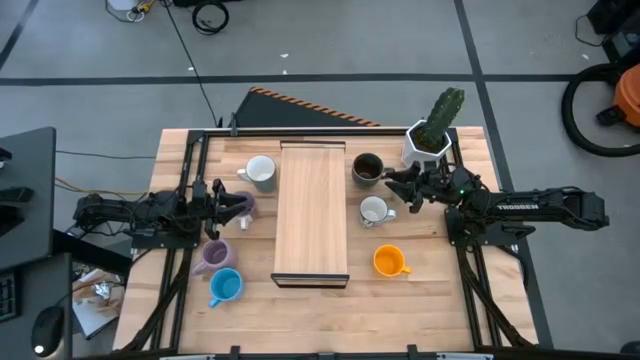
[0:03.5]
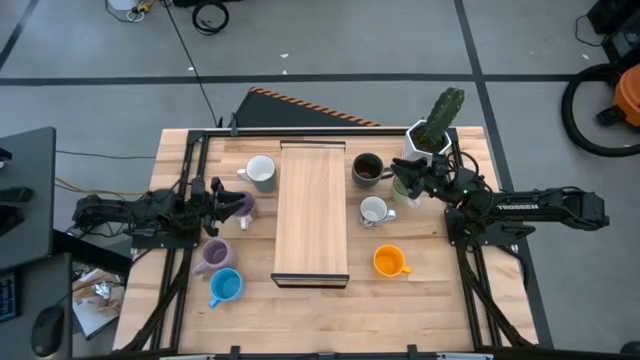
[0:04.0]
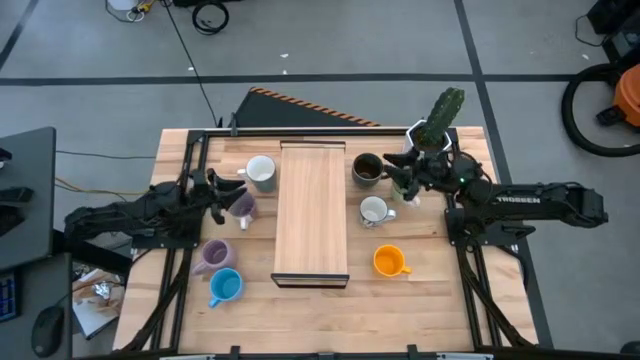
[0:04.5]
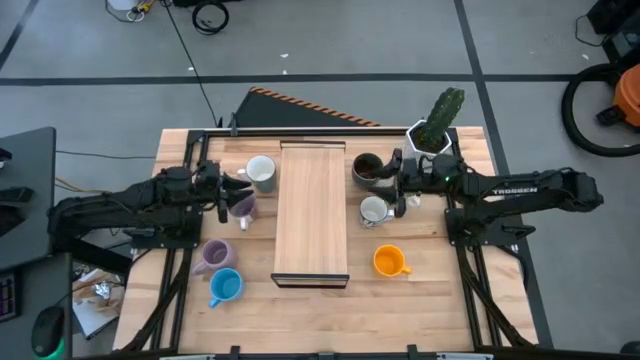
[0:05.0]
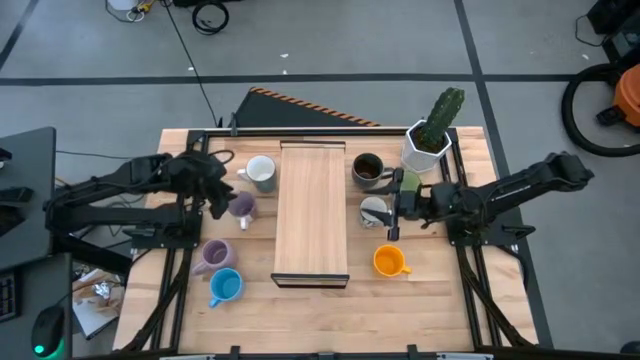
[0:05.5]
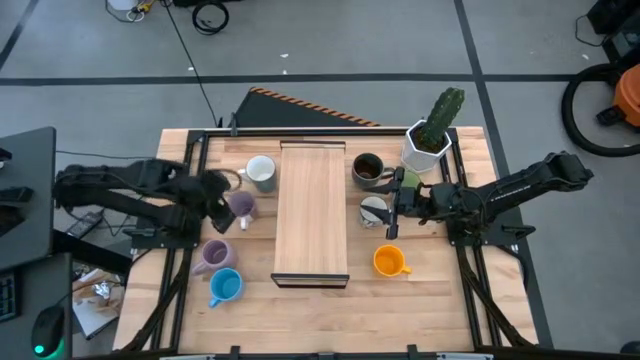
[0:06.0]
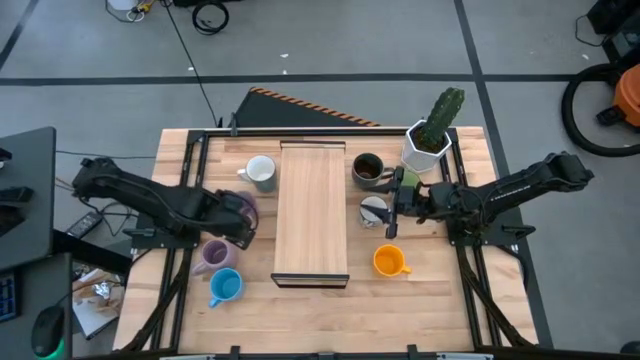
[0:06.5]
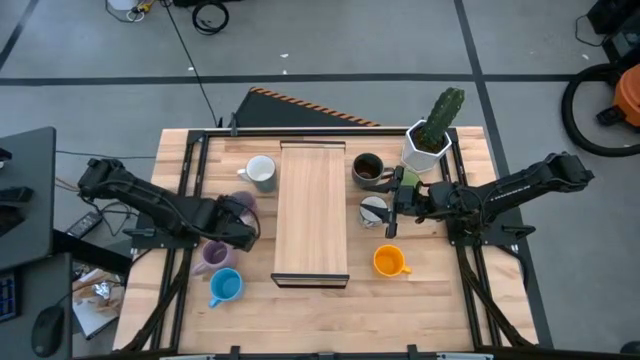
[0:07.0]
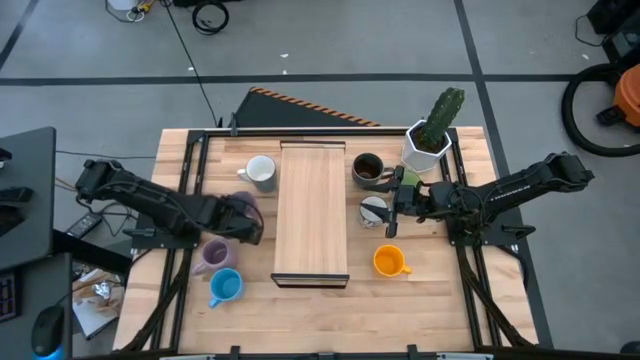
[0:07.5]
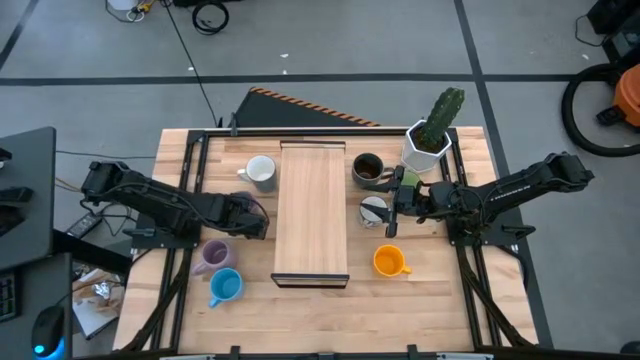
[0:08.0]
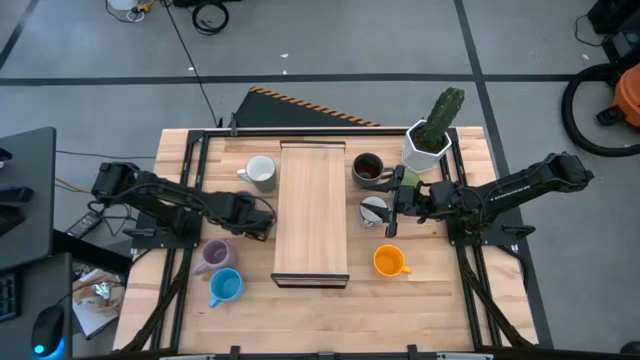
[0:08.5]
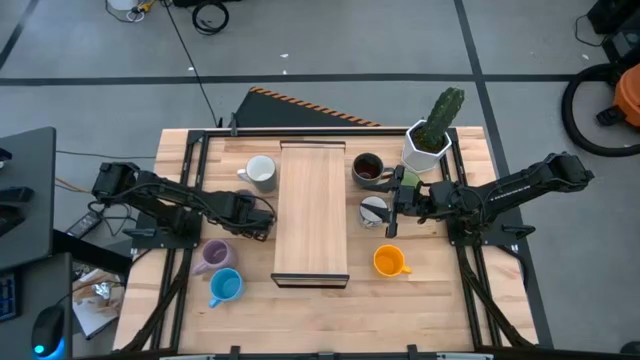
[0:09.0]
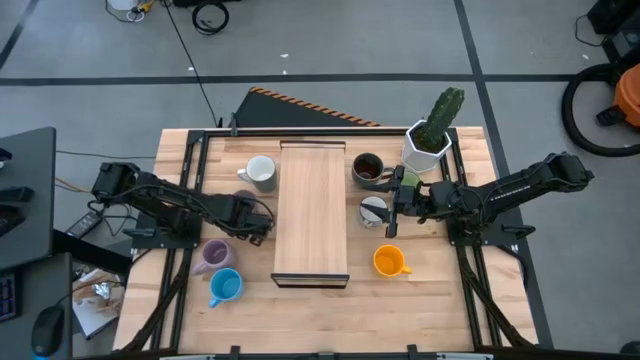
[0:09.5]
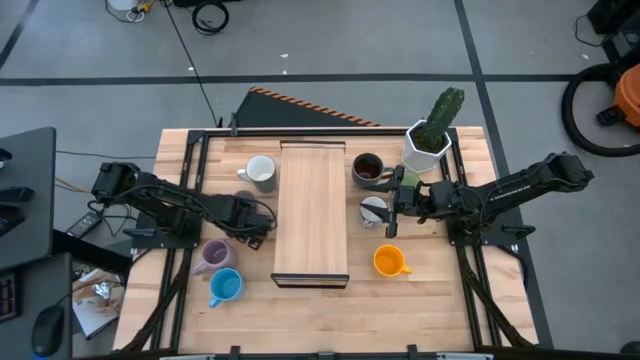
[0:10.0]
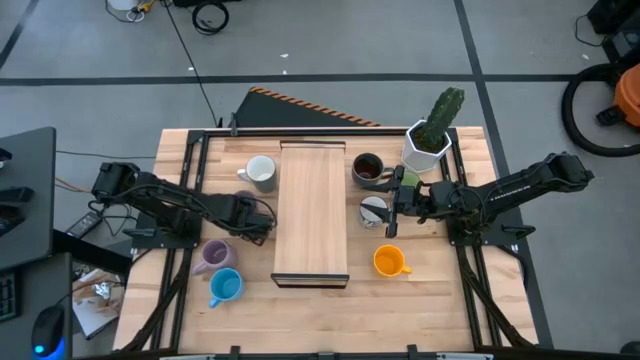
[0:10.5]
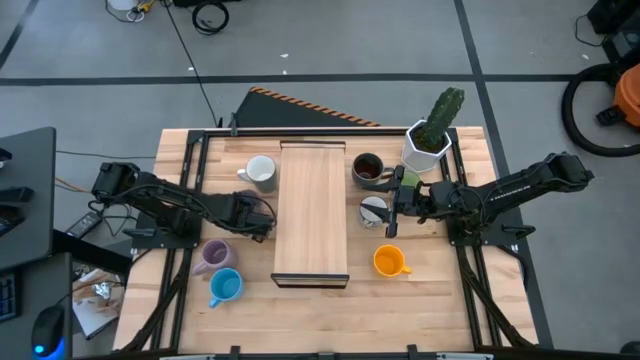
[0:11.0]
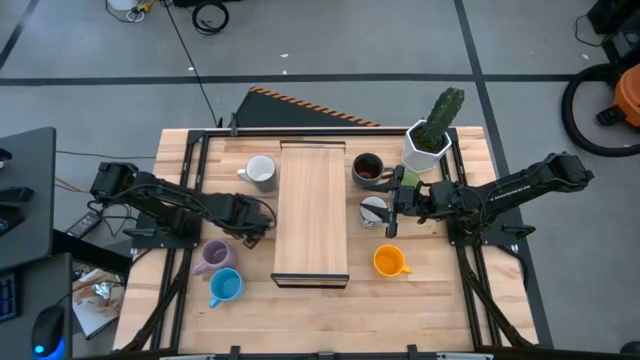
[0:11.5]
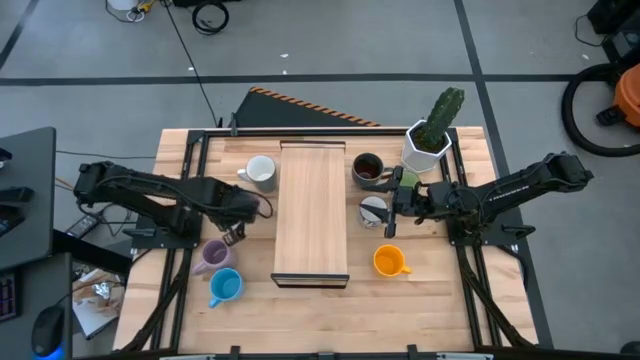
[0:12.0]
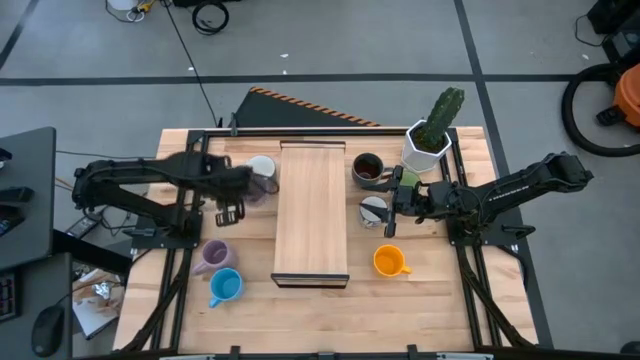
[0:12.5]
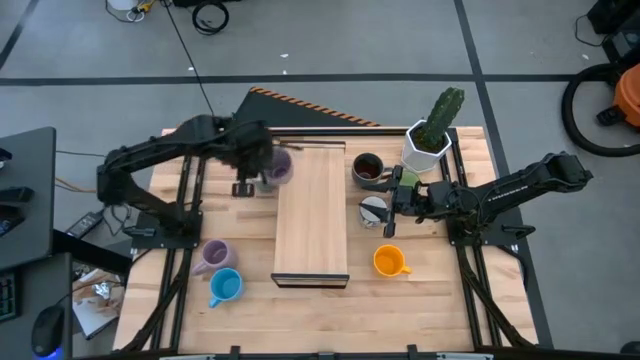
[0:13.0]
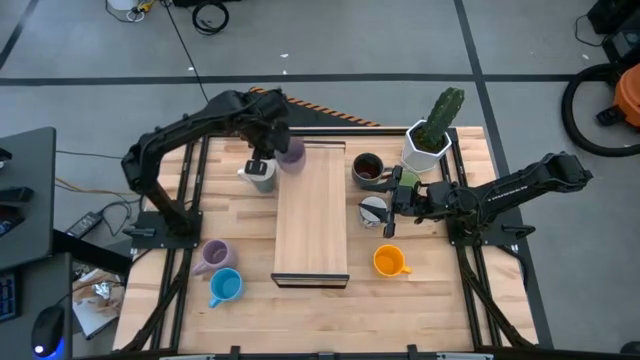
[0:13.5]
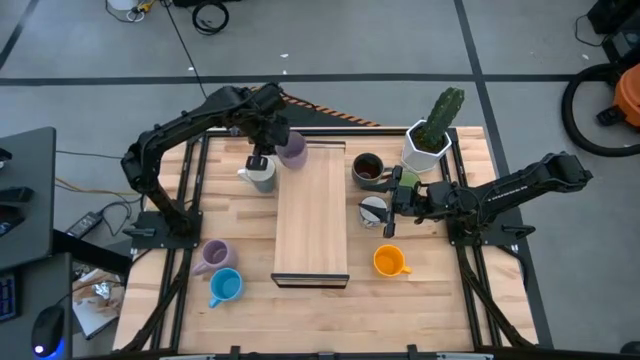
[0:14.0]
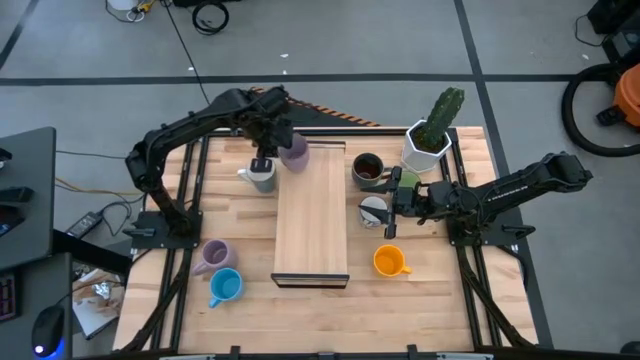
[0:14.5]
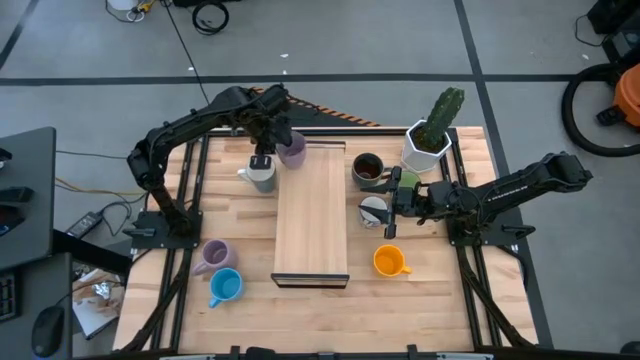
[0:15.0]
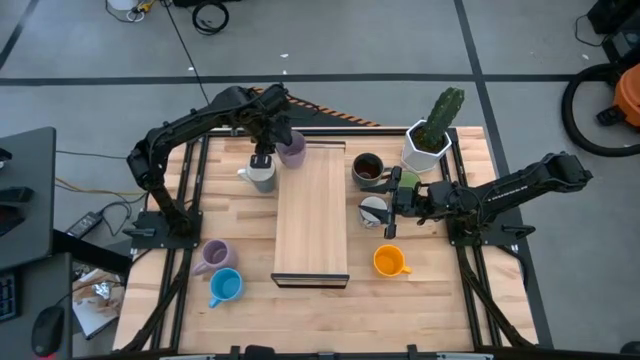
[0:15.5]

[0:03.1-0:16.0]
Task: Place coffee mugs
Put the top violet mug on the shelf

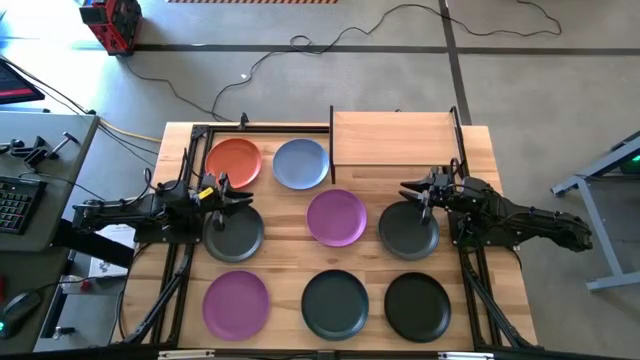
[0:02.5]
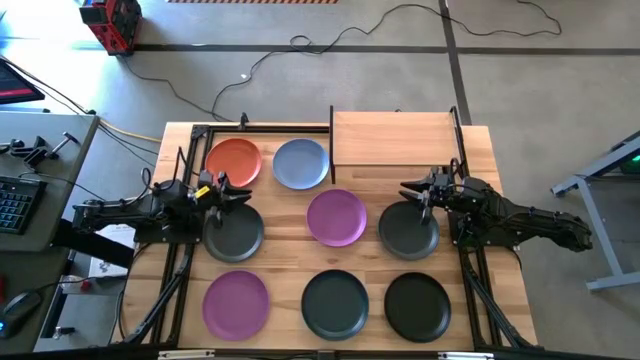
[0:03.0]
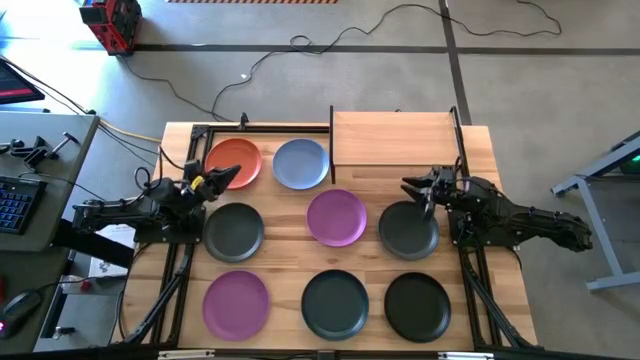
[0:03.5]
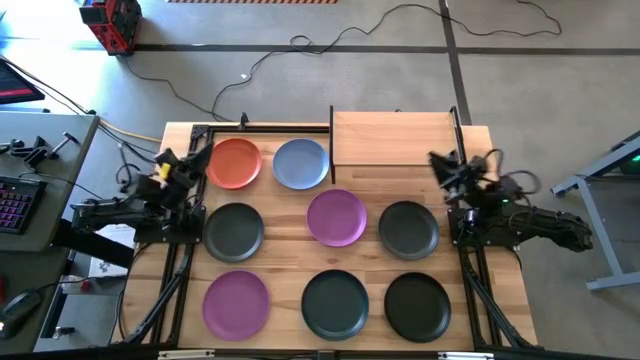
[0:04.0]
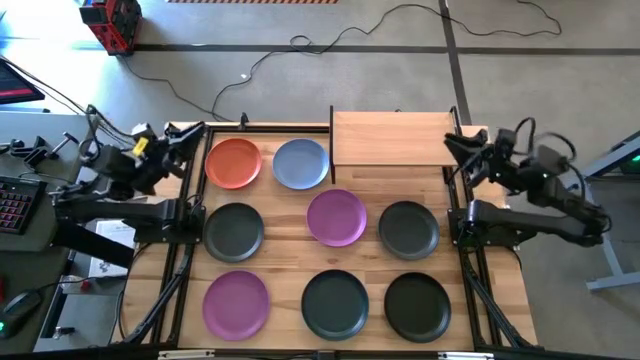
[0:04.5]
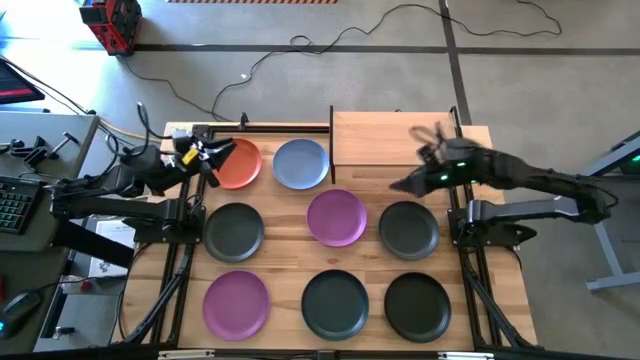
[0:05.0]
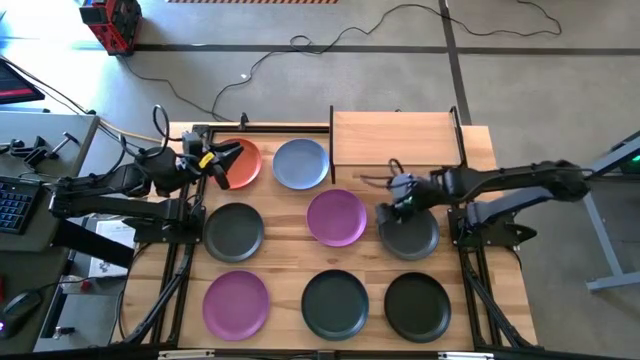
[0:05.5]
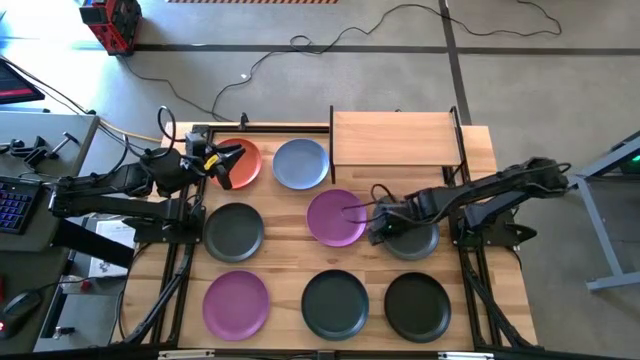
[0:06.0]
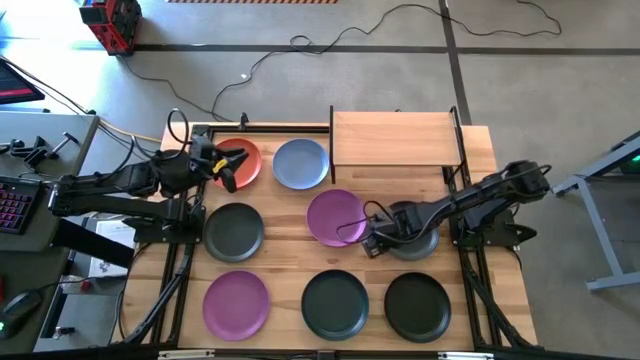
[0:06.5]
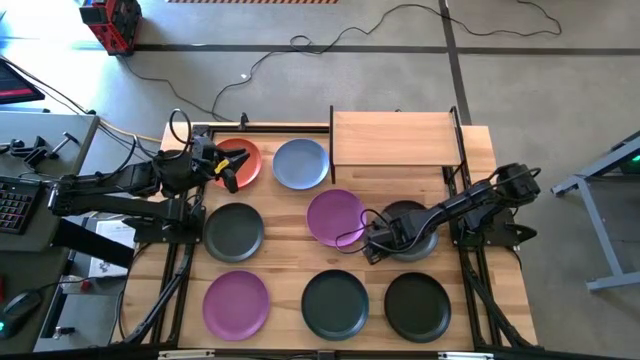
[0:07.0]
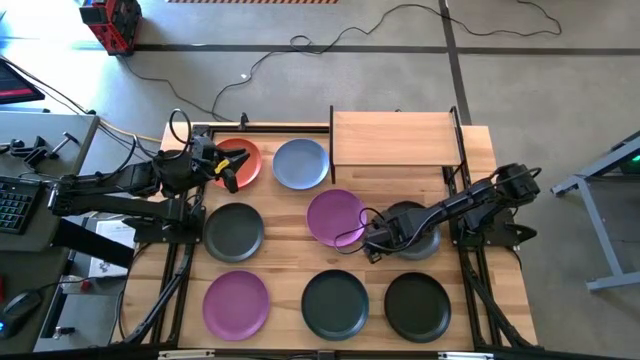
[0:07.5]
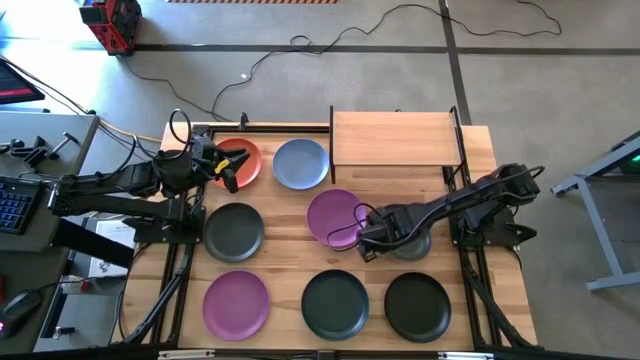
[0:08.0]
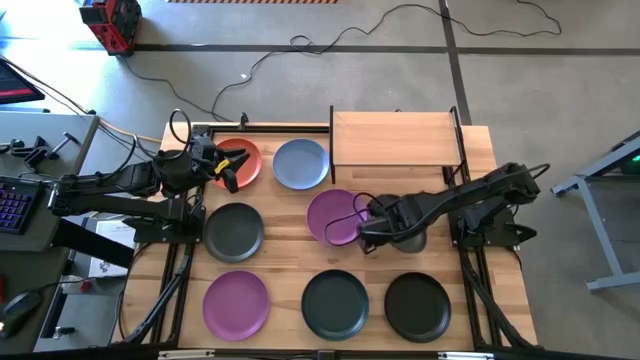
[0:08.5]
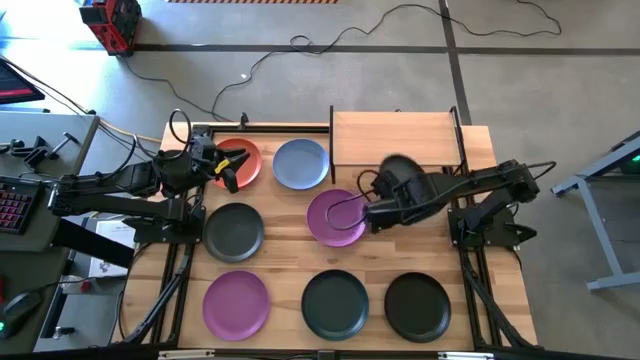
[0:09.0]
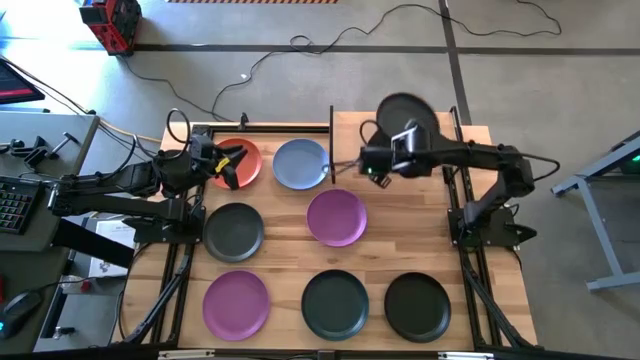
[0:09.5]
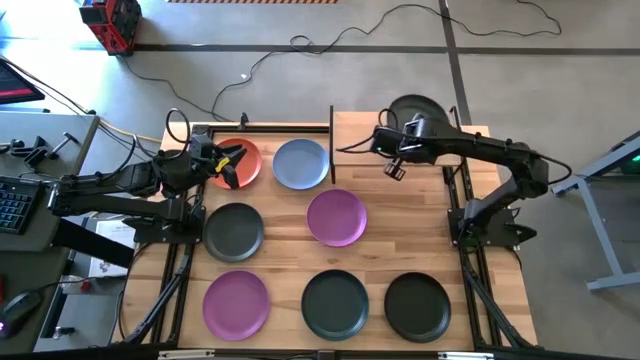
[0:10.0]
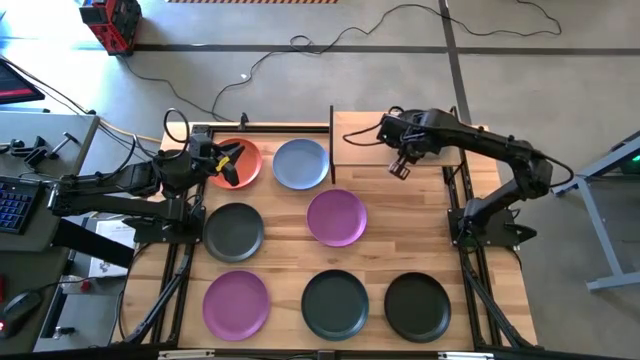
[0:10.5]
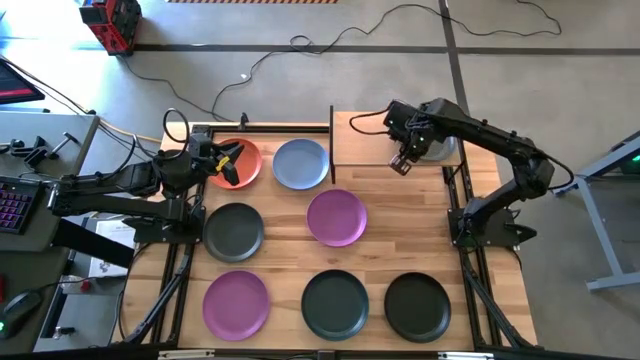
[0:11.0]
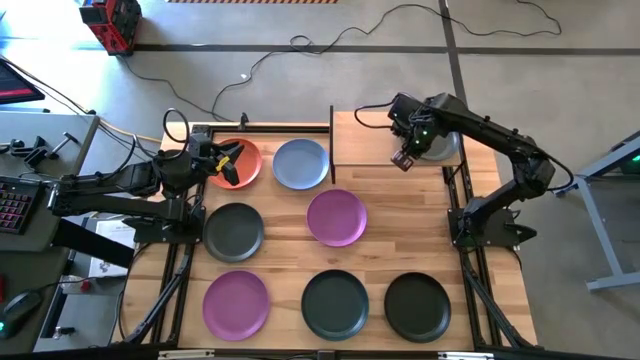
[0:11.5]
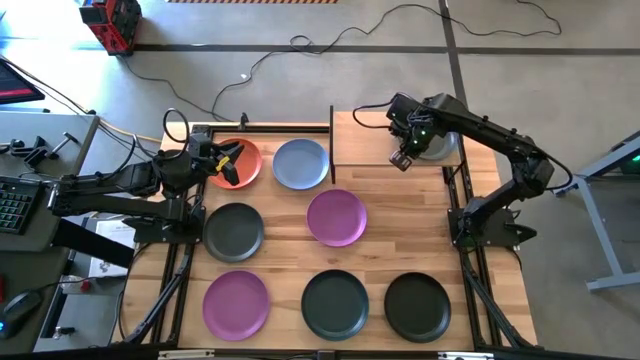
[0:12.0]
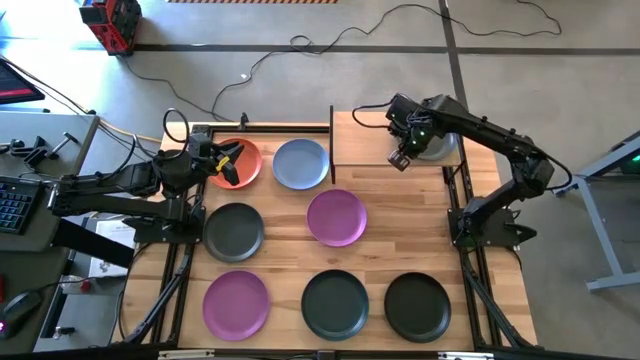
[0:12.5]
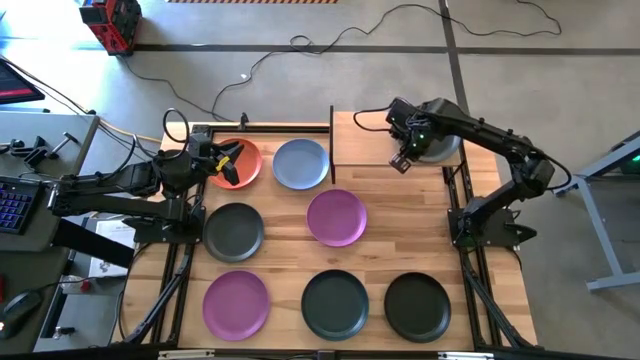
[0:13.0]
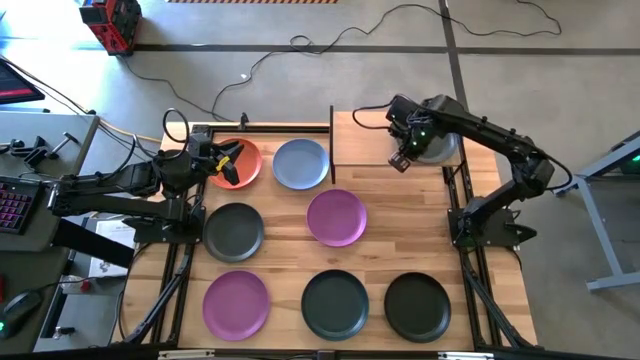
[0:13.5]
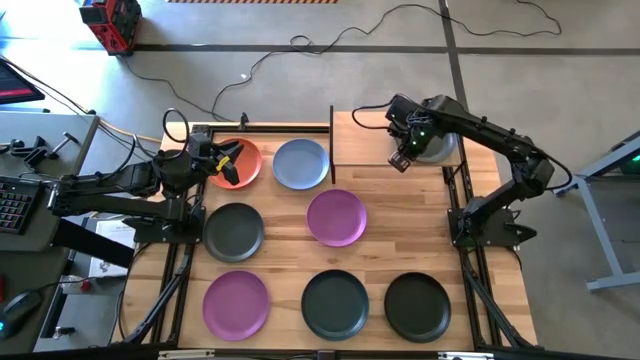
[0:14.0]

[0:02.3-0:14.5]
Task: Place and stack plates onto a shelf
Put the top right black plate on the shelf
